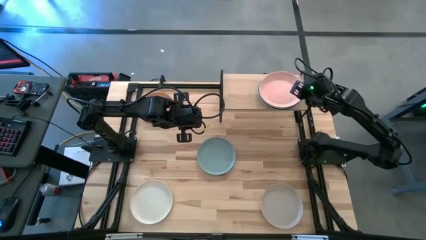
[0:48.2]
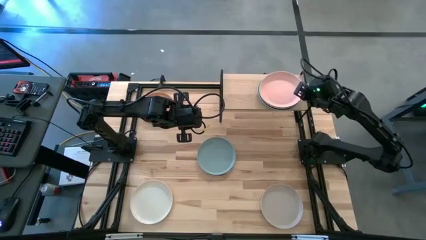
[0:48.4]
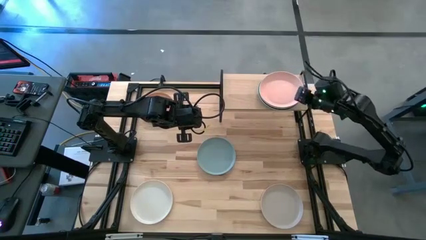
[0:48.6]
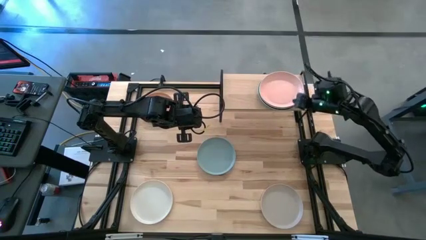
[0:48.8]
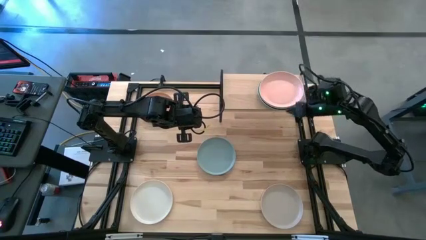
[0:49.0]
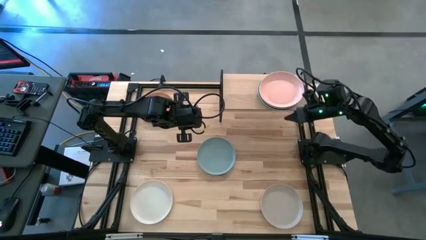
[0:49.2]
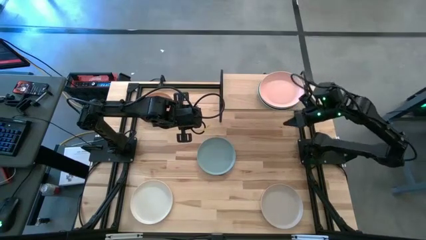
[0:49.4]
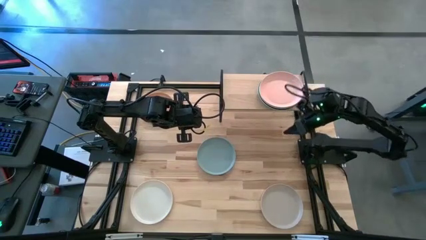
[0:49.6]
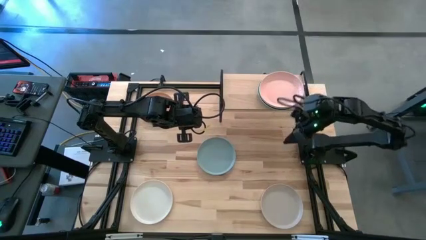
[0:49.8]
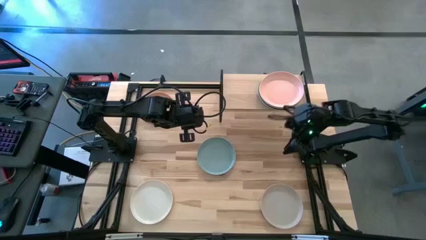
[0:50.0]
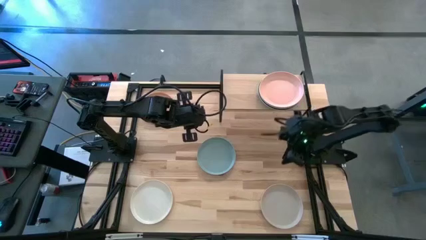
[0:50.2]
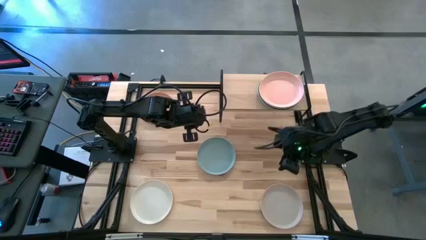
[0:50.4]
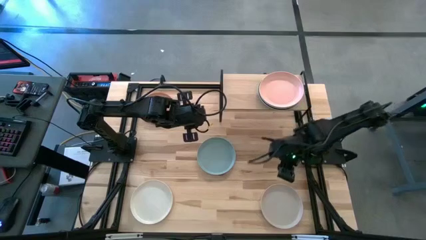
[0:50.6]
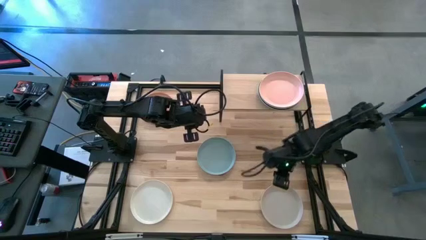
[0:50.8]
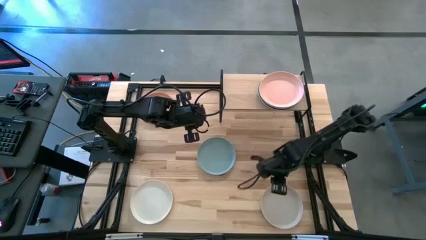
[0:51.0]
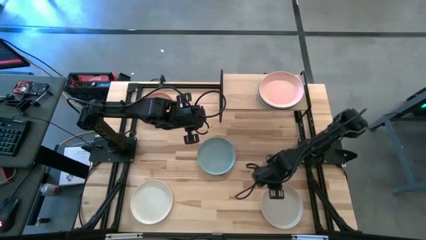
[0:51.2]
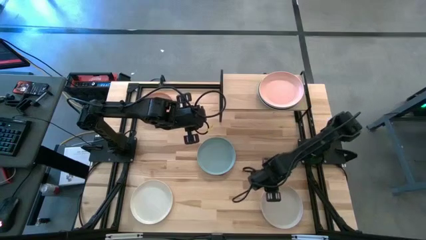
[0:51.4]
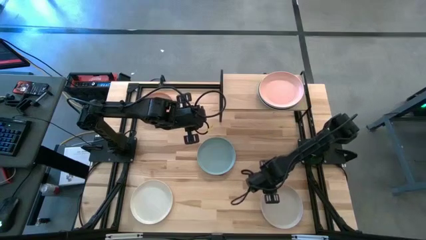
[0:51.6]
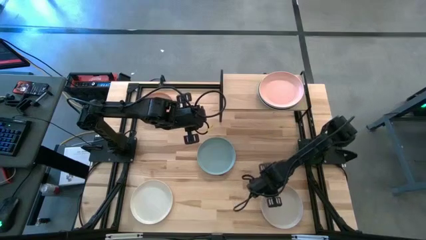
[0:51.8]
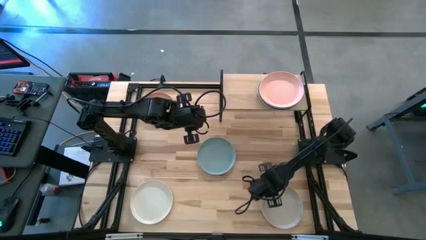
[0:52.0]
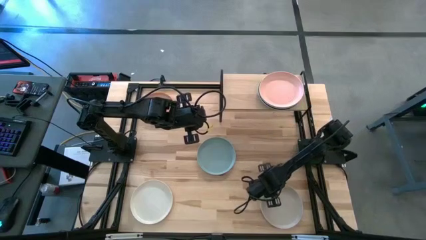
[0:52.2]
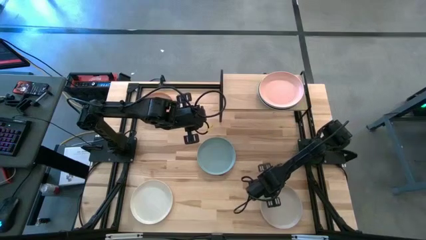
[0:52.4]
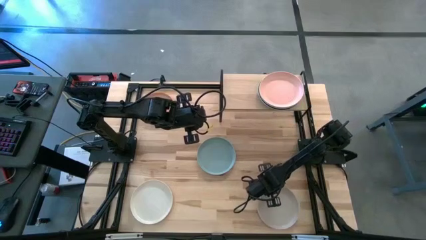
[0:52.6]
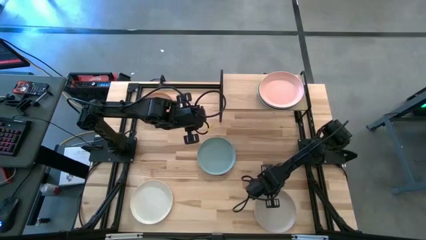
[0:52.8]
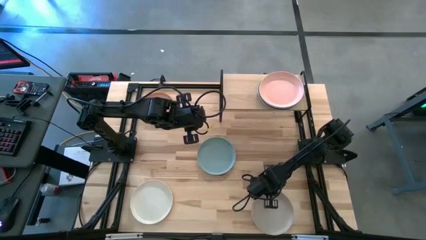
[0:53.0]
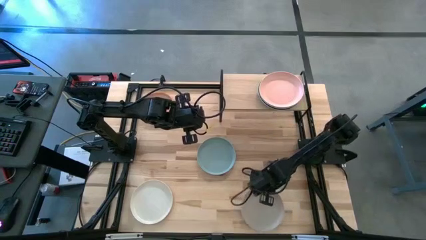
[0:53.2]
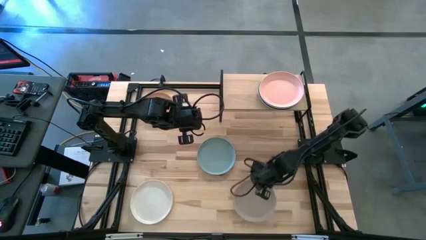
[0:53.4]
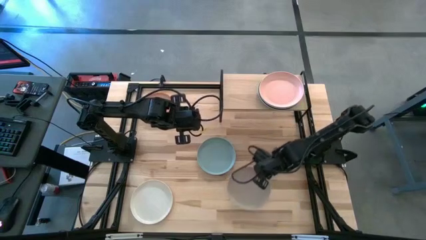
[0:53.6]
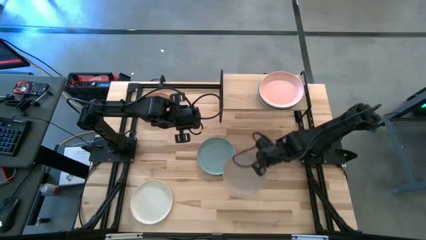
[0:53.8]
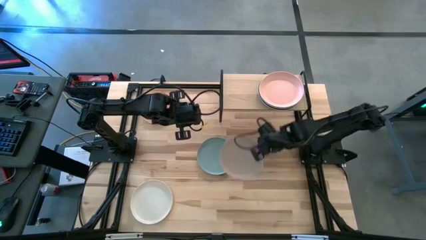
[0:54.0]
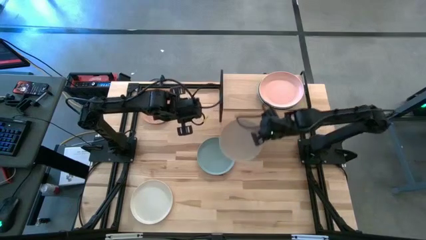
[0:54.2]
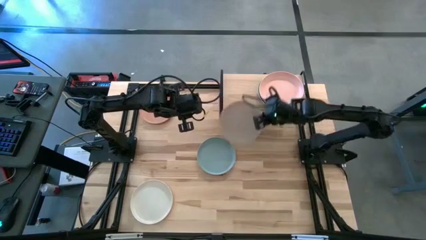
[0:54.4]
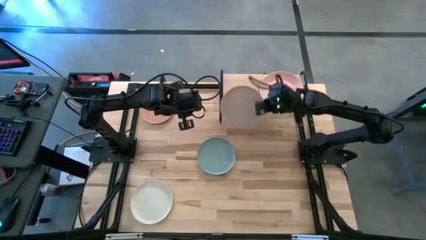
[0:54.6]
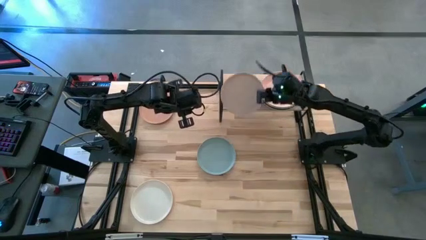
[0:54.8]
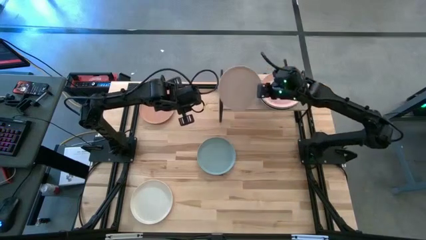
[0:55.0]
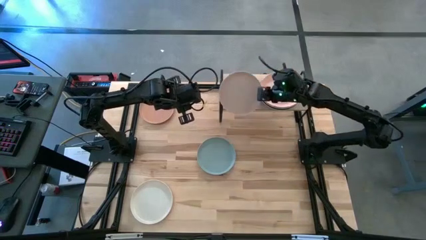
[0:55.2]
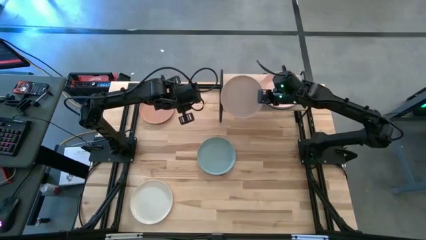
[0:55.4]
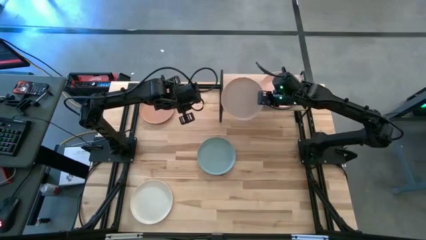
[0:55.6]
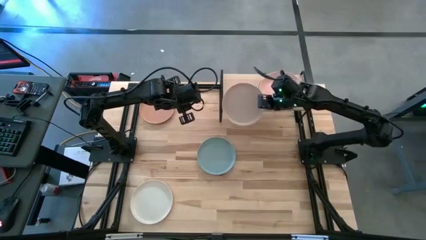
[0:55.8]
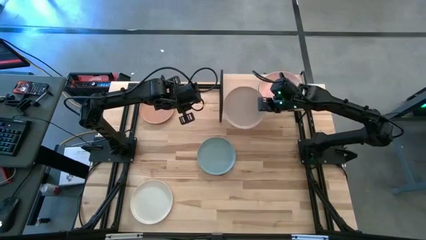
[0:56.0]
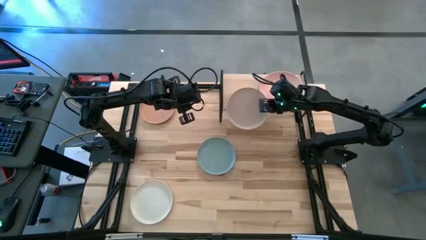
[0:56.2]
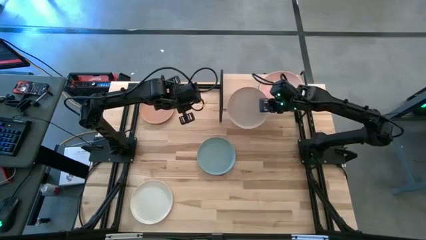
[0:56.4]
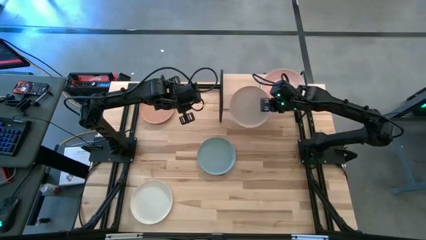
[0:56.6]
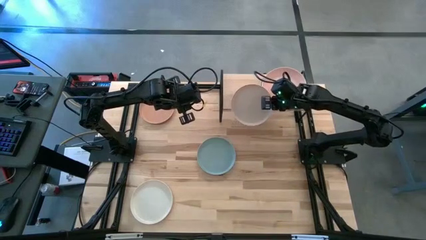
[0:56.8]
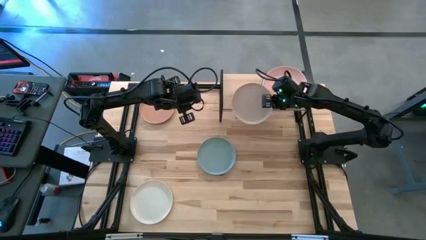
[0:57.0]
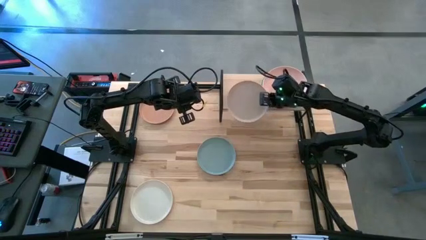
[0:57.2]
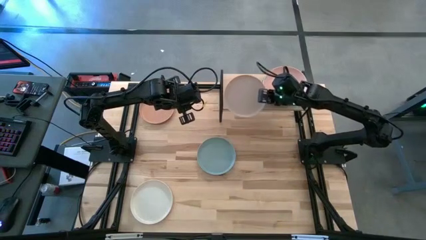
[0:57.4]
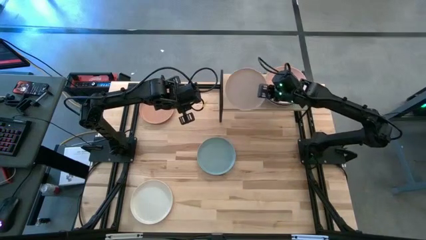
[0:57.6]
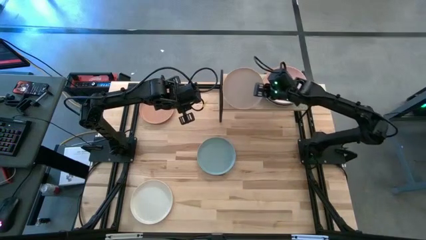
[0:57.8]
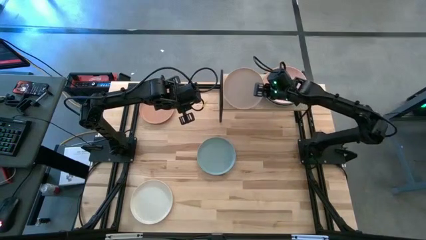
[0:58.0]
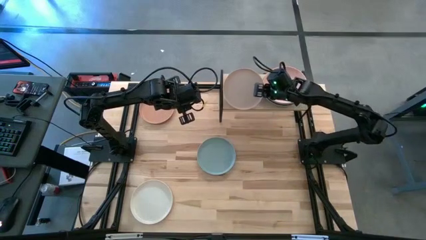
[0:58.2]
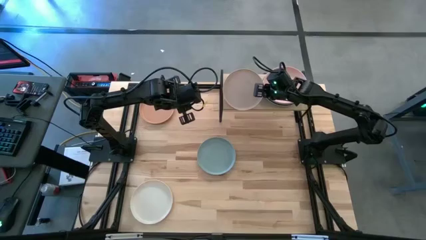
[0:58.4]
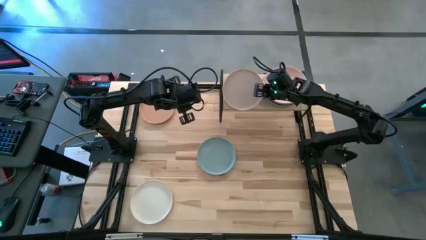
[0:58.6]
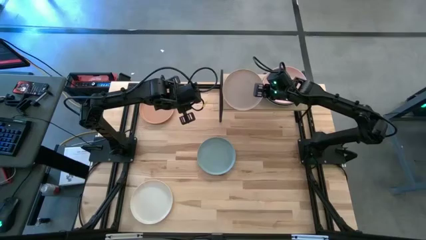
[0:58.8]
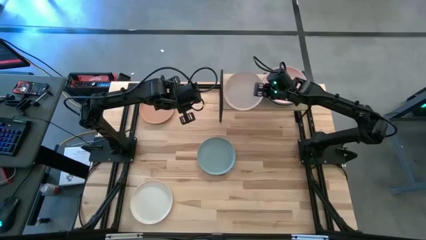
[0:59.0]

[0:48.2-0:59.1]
Task: Place and stack plates onto a shelf
Put the light brown plate on the shelf

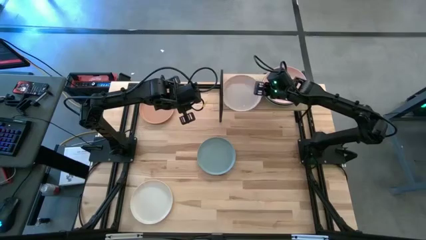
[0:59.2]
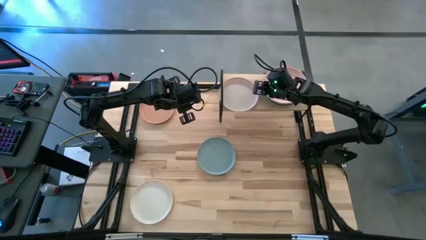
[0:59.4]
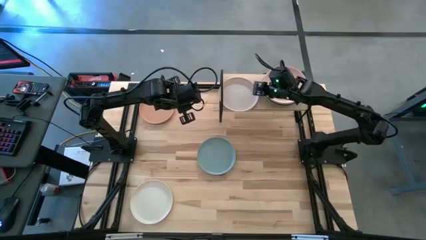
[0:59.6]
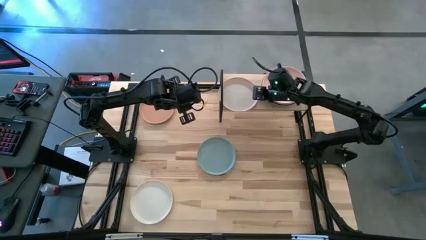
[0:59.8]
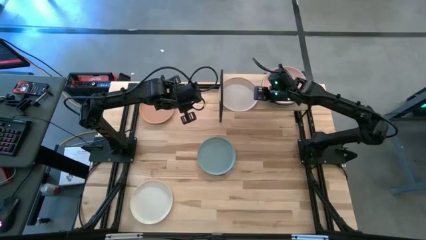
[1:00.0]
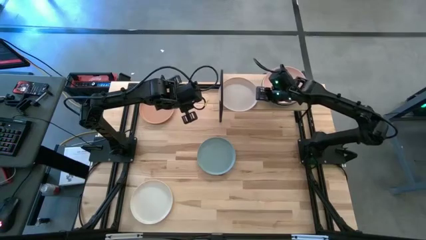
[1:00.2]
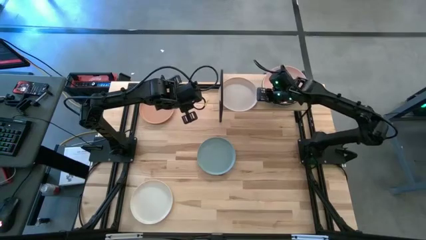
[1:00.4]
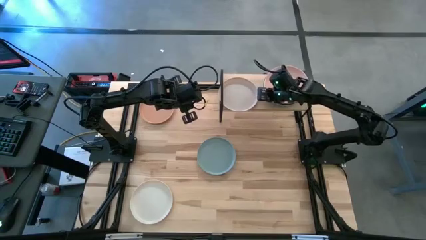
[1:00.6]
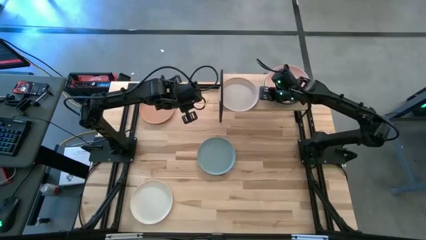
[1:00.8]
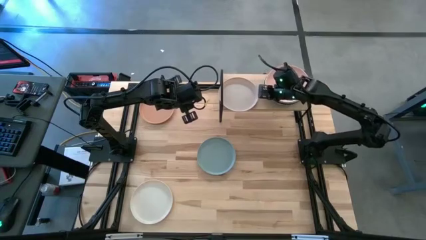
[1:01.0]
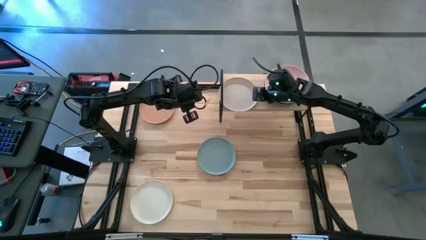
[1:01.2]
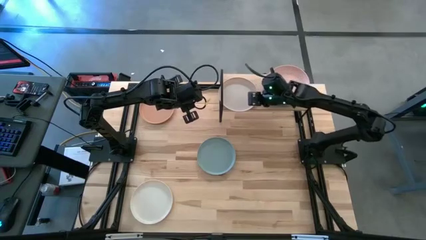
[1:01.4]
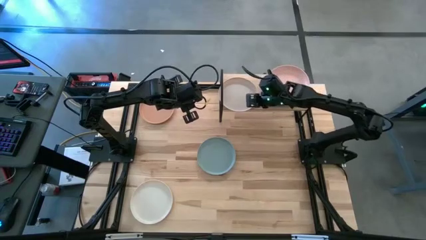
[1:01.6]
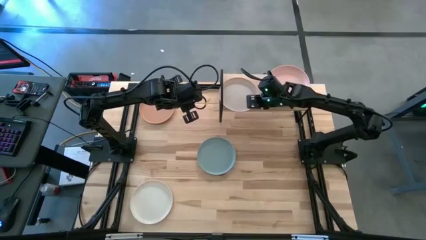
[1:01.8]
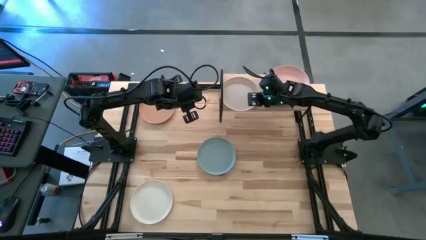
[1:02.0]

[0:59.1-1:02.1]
Adjust the plates on the shelf
